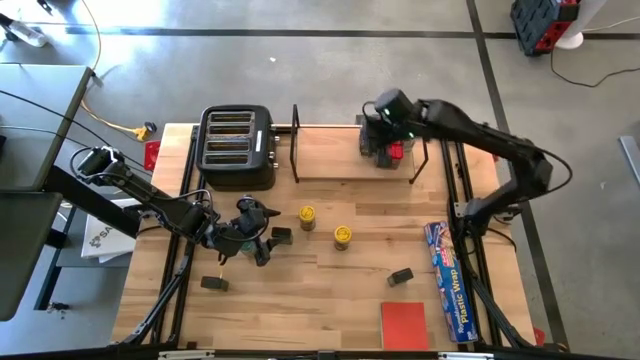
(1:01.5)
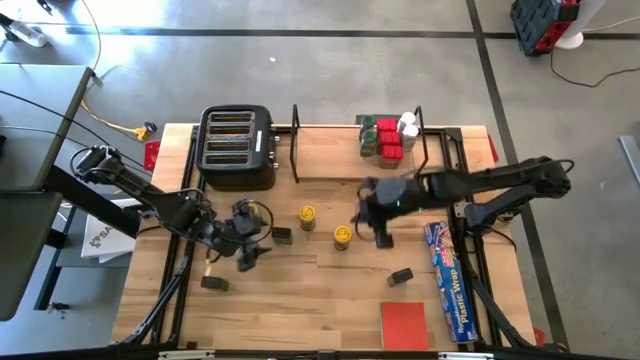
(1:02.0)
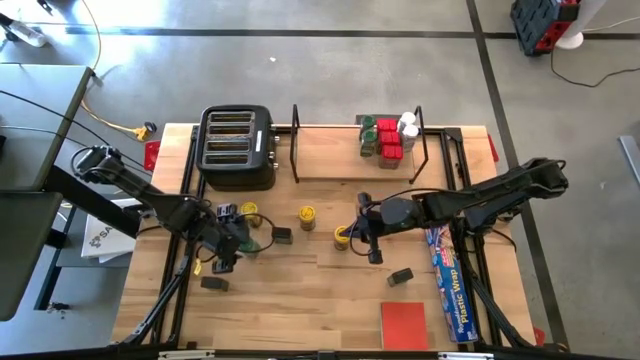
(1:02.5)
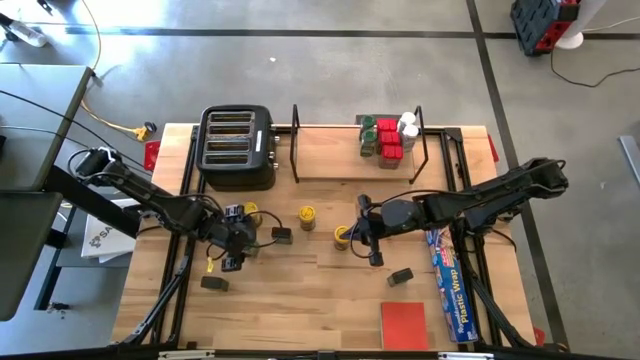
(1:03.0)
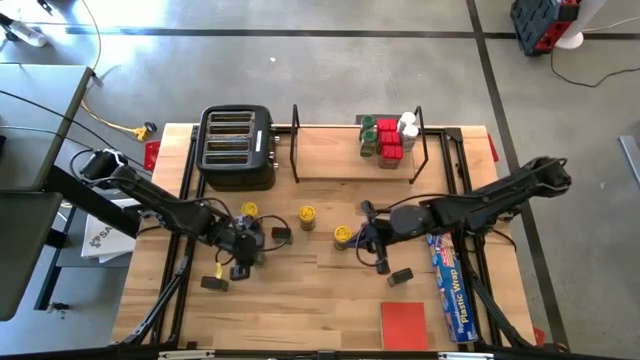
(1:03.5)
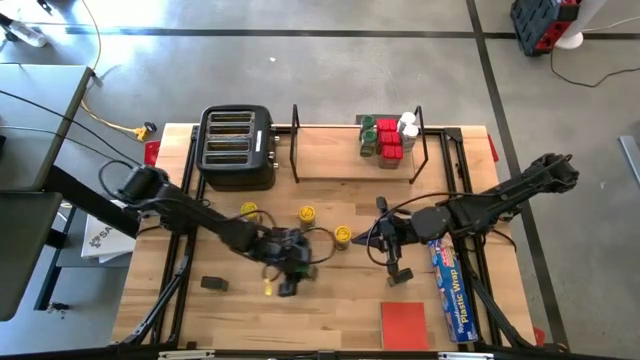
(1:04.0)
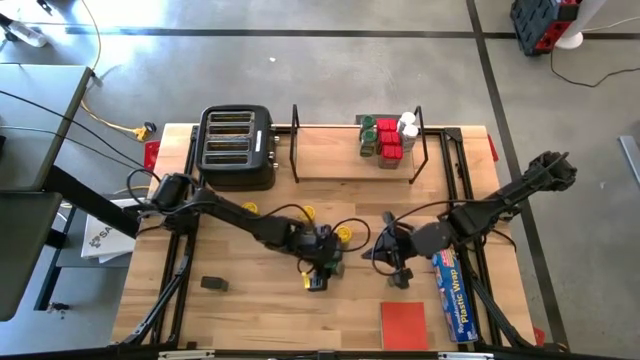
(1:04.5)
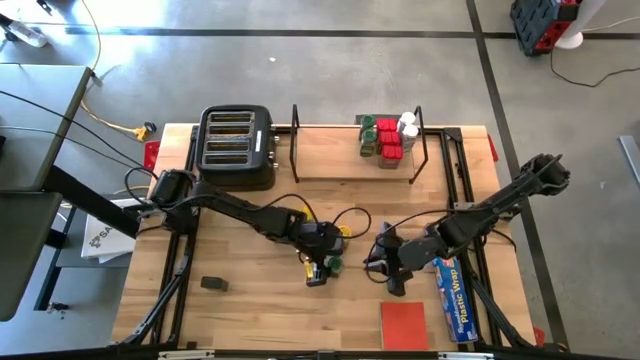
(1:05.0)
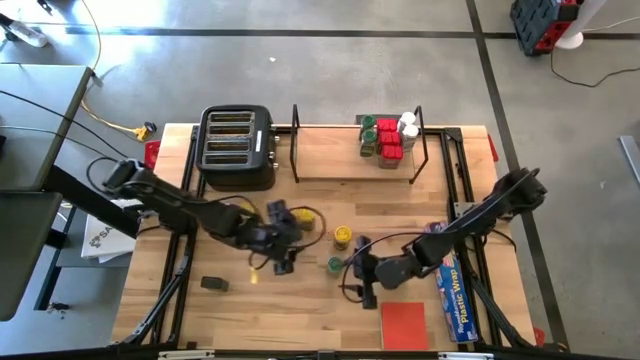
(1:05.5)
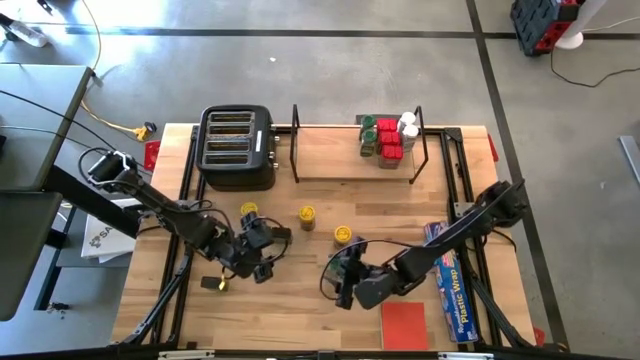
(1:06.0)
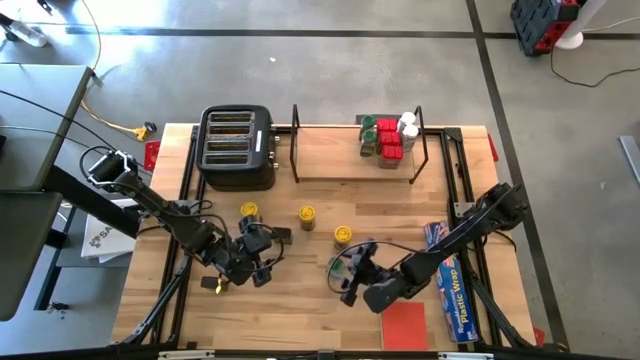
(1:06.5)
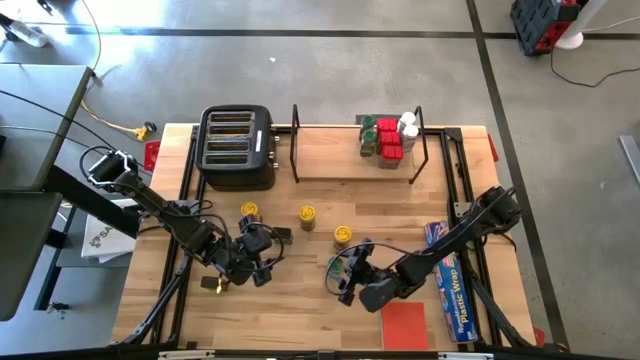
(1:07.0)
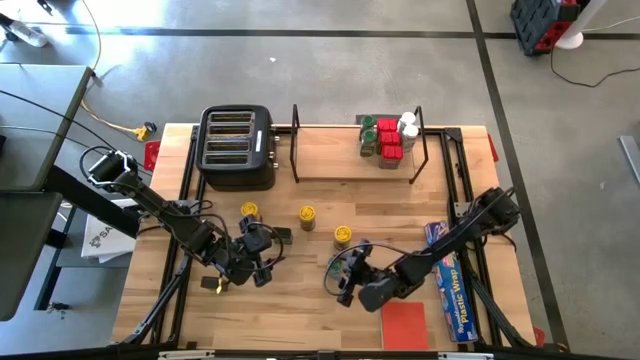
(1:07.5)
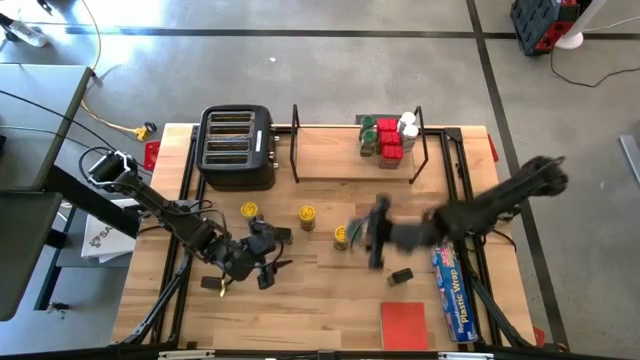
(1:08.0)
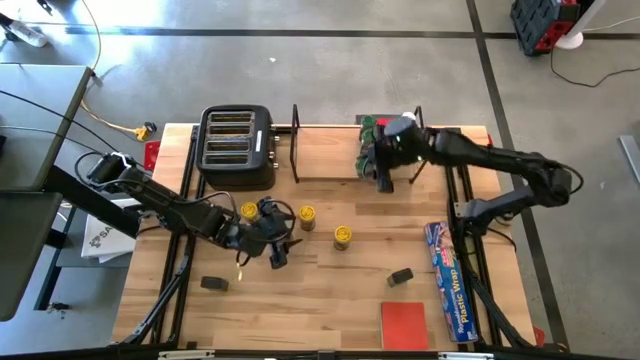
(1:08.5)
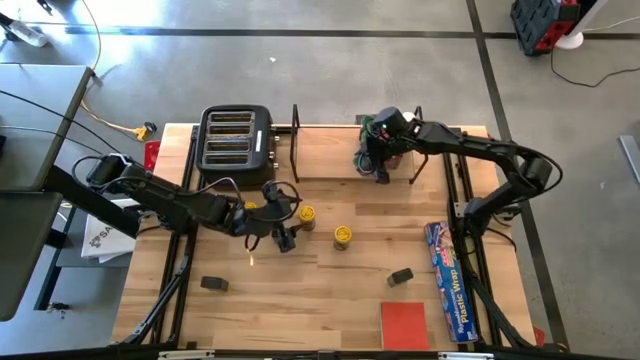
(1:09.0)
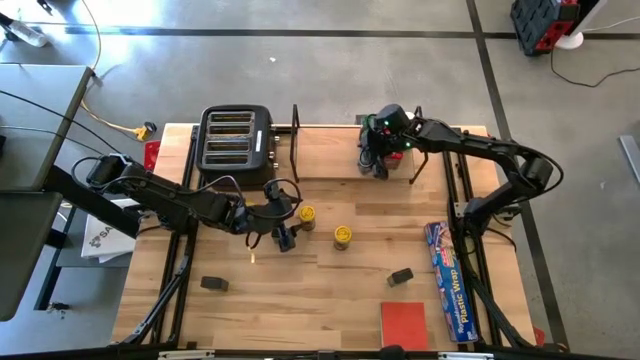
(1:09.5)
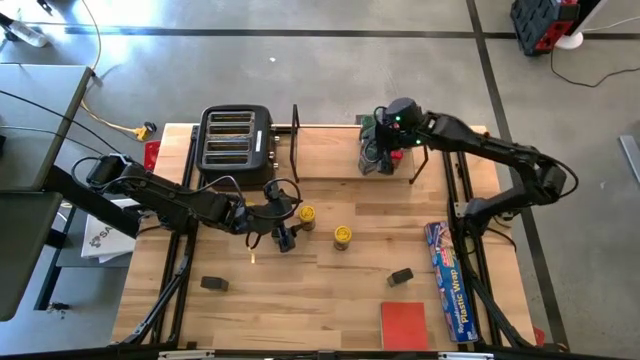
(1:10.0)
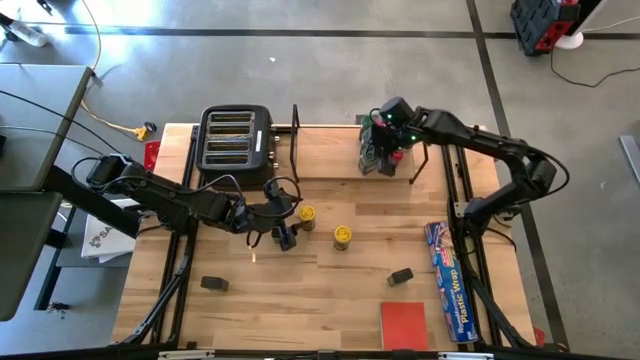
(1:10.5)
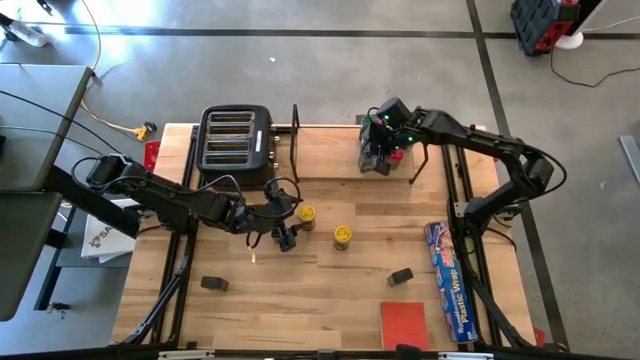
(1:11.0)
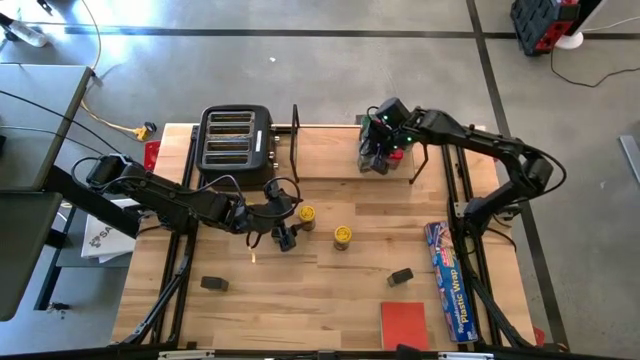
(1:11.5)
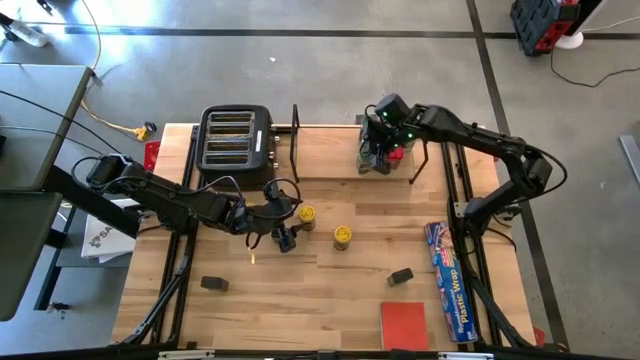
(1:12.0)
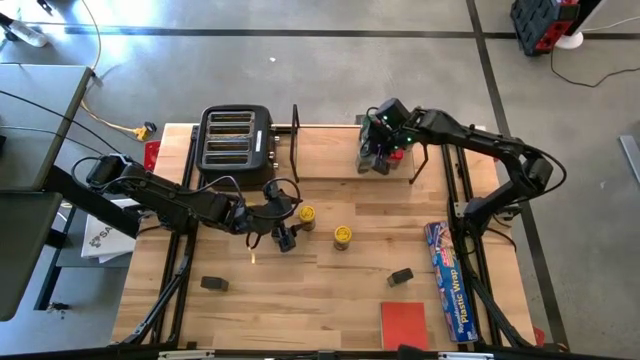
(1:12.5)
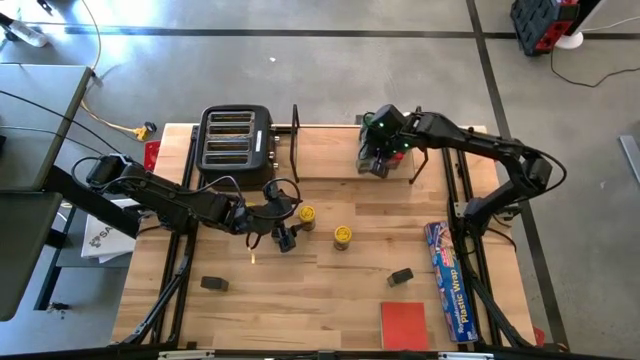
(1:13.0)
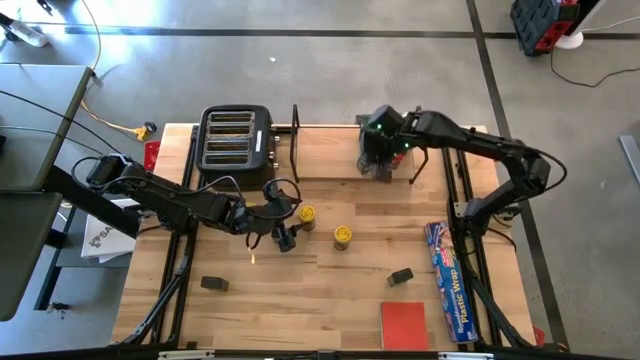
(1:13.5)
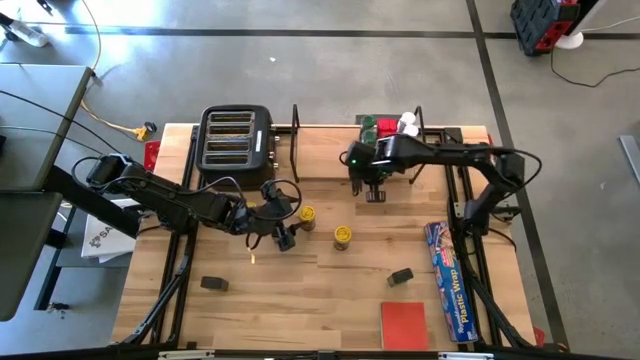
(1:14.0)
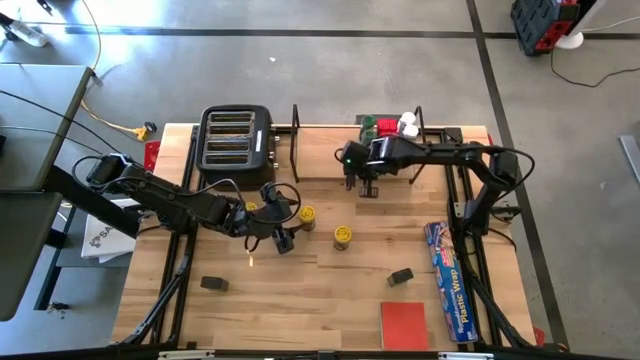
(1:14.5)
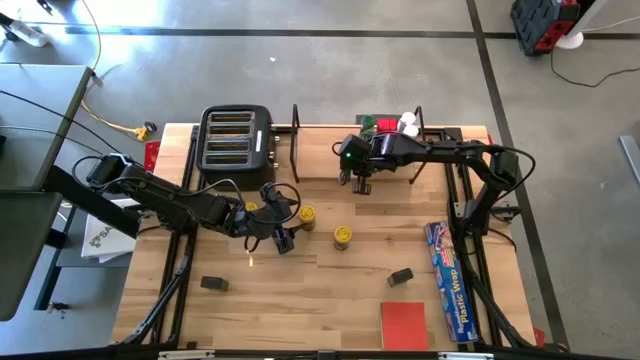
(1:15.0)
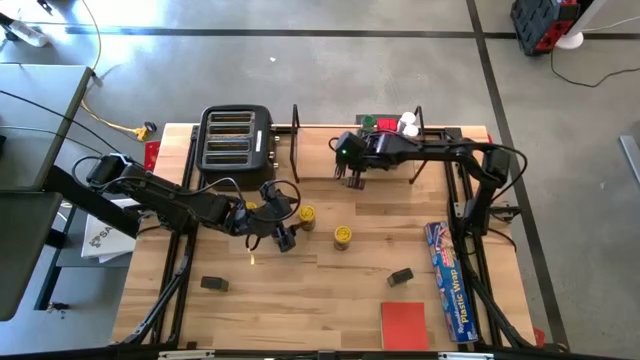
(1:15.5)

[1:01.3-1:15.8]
Task: Shelf spices
Put the green seasoning bottle on the shelf aligned with the other green seasoning bottles

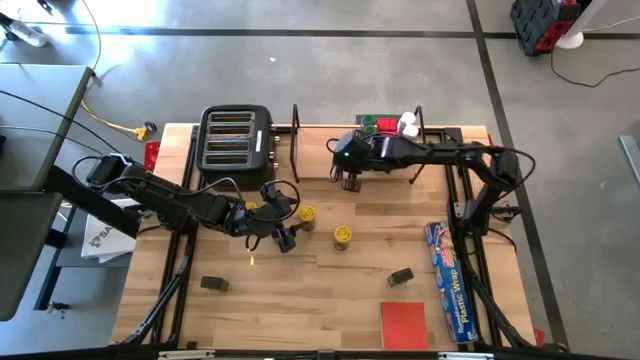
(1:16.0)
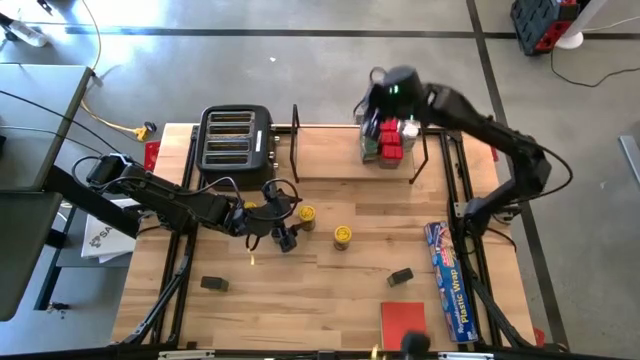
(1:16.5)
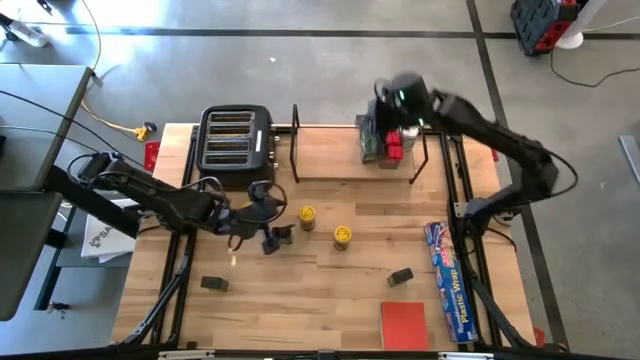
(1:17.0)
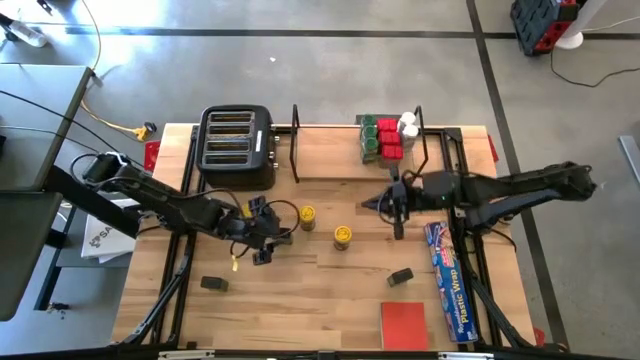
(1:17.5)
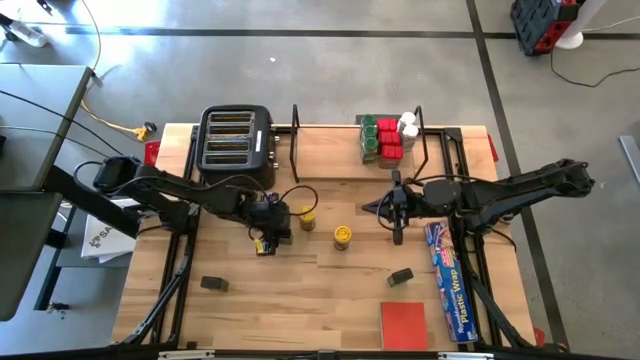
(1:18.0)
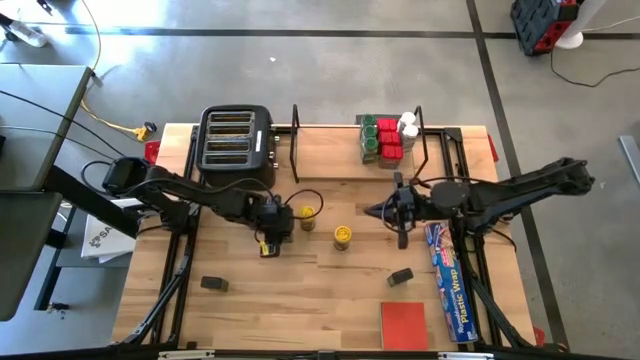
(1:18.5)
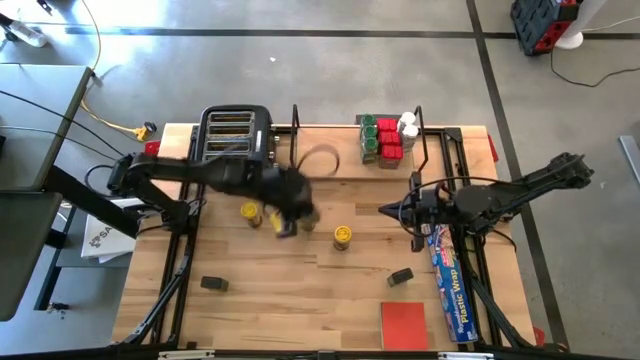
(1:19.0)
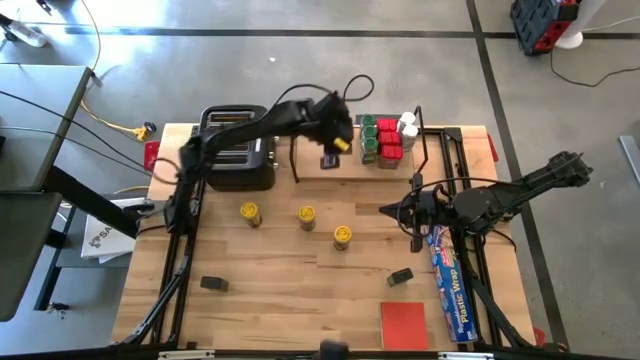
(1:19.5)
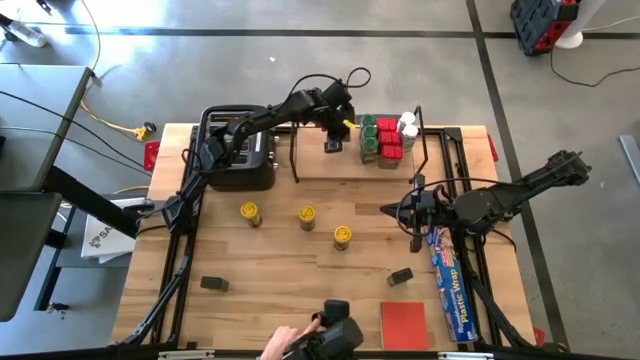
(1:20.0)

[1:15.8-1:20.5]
Put the top left black seasoning can on the shelf

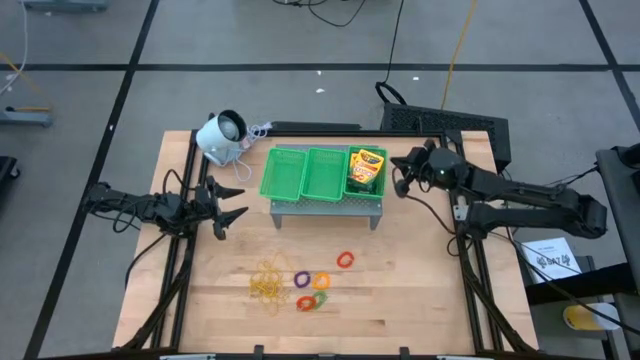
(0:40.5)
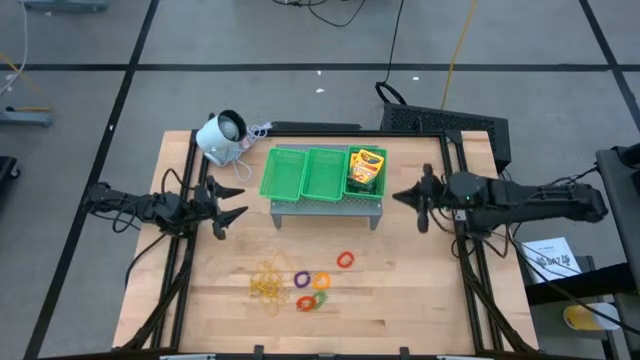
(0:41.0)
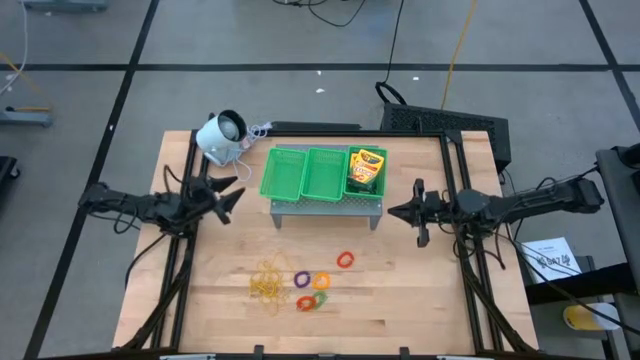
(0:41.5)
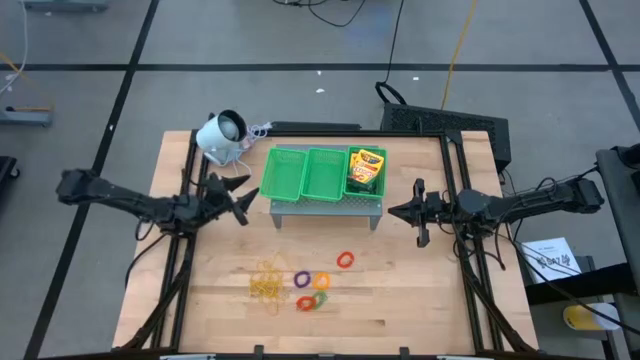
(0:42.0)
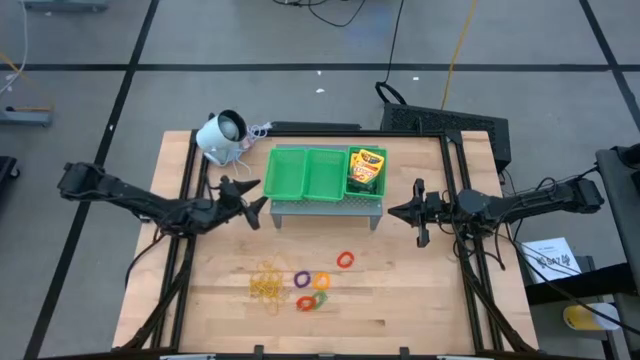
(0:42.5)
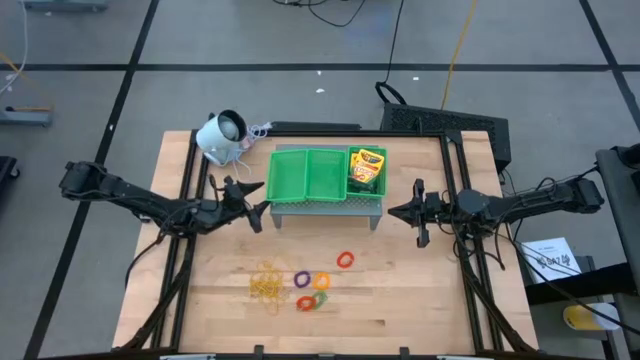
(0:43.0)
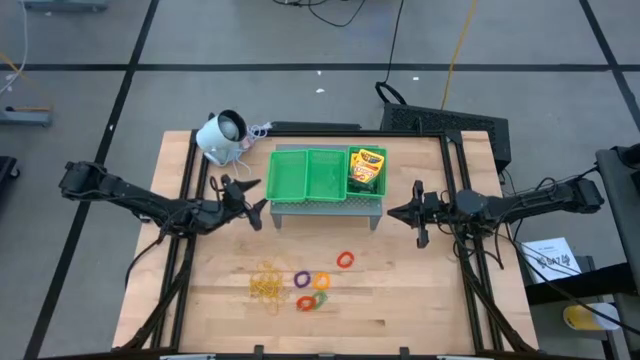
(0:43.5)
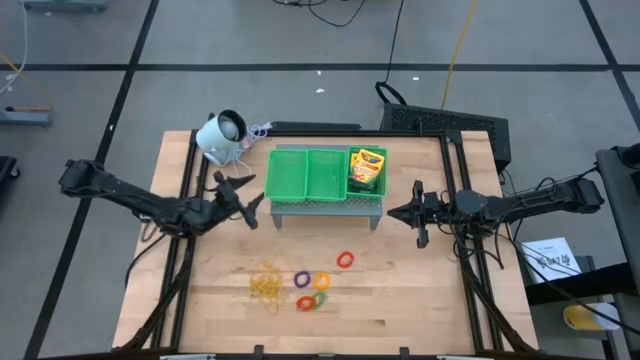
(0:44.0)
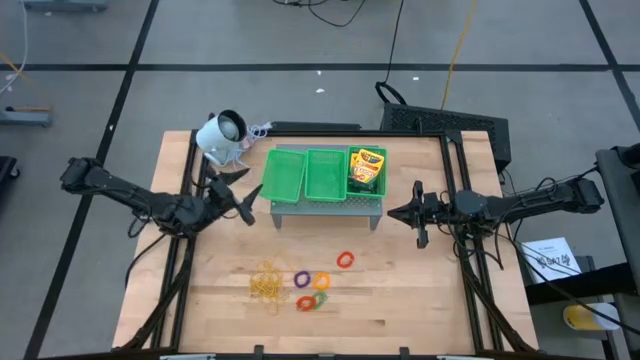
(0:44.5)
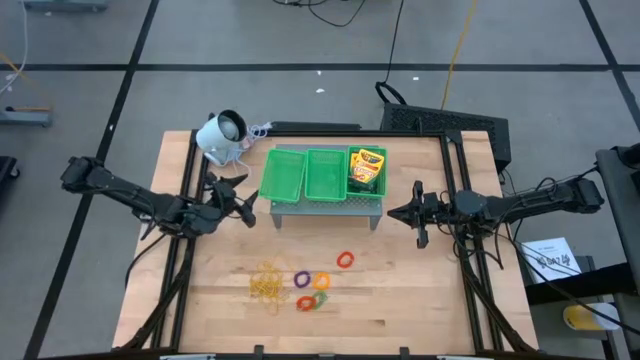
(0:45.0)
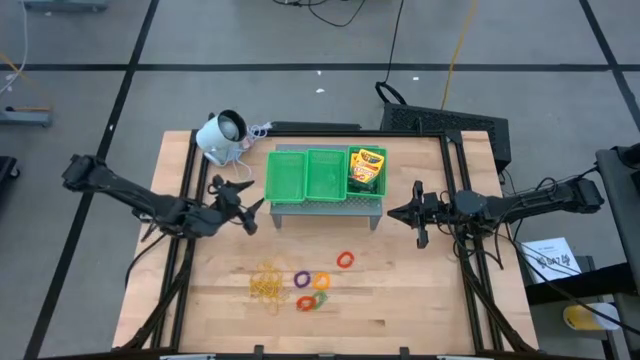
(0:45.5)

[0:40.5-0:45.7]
Task: Pick & Place Office Desk Supplies
Adjust the left green basket on the shelf
